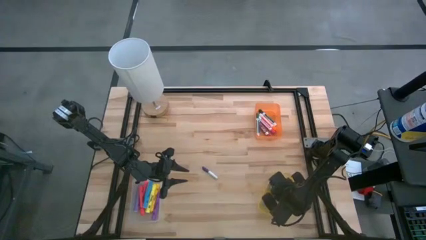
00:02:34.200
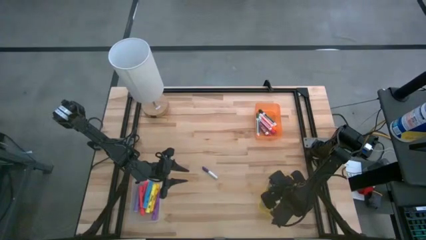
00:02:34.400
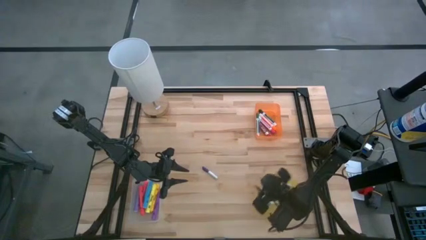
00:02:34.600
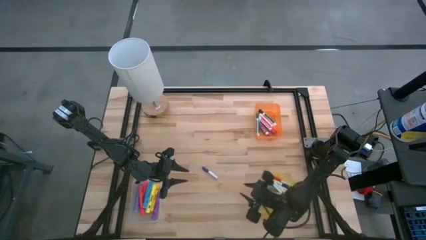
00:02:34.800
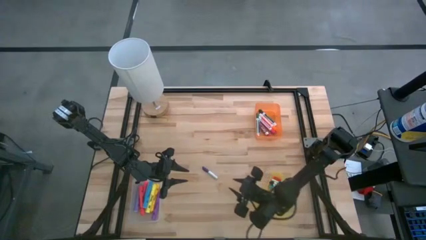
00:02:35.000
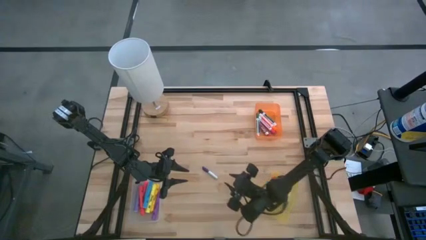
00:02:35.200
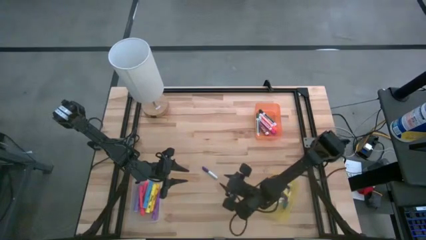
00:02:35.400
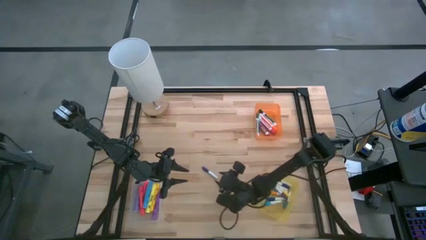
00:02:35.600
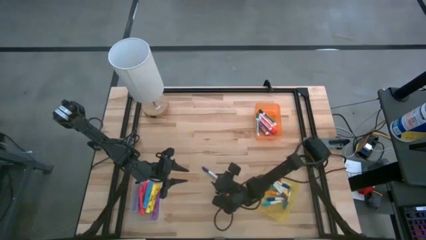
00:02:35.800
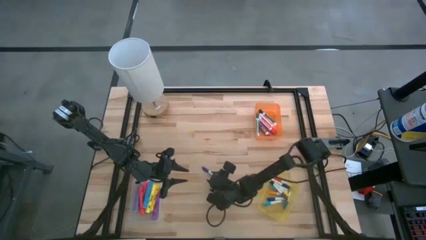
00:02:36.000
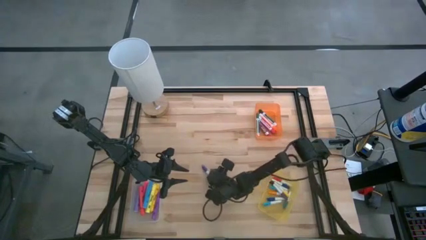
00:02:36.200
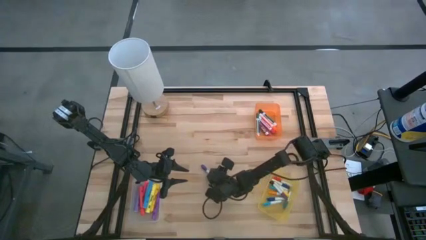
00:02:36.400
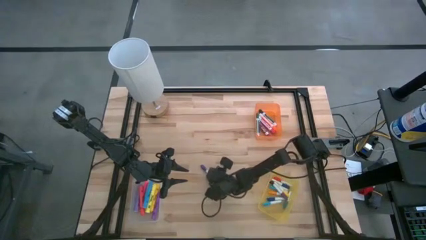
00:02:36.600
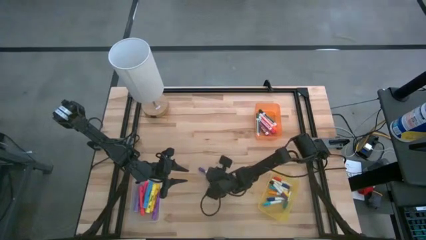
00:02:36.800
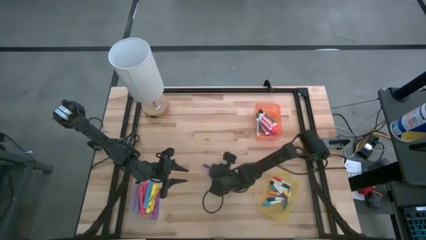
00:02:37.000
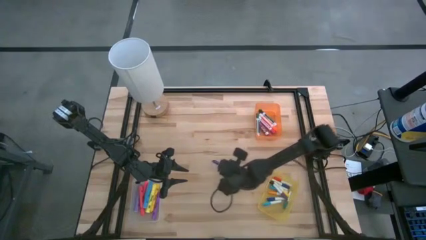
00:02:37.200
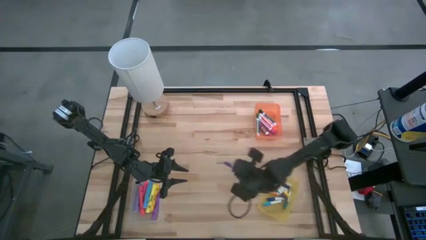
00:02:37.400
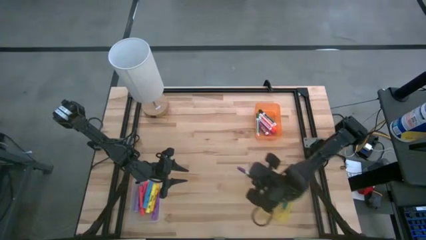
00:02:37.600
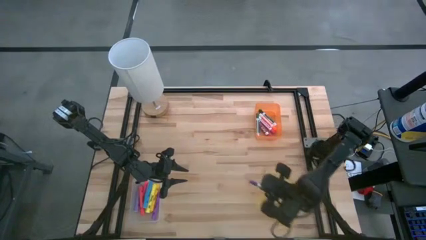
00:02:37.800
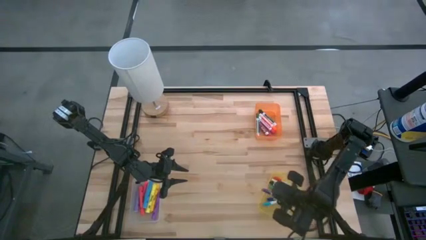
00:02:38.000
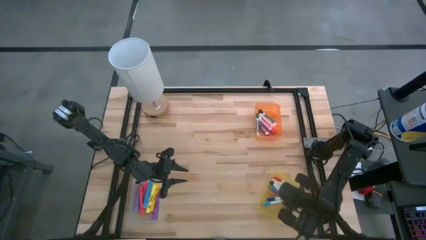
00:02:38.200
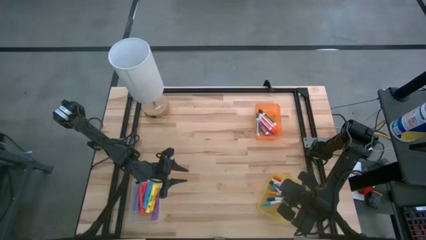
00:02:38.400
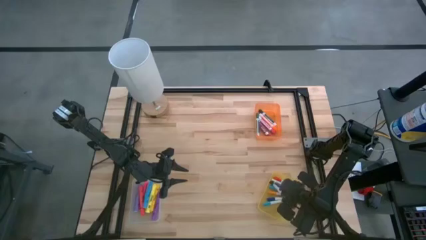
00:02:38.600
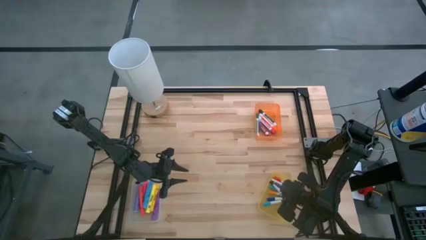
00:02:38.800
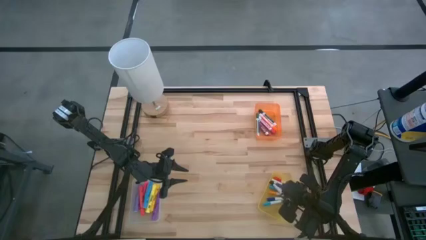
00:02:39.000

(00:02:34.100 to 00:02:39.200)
Task: Pick & Place Markers
Put the violet highlighter pen into the yellow bin

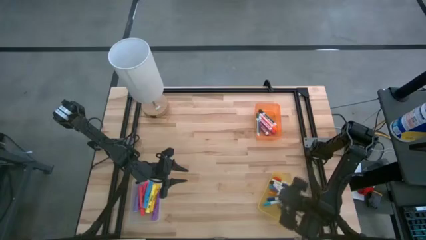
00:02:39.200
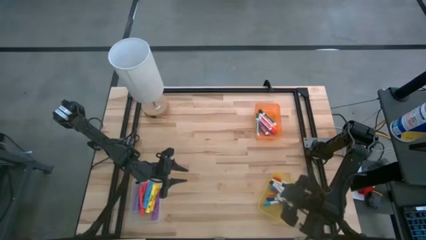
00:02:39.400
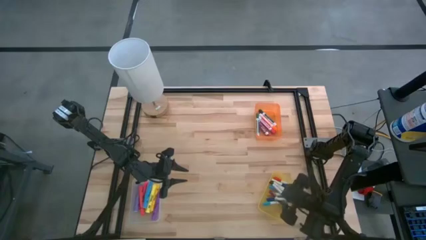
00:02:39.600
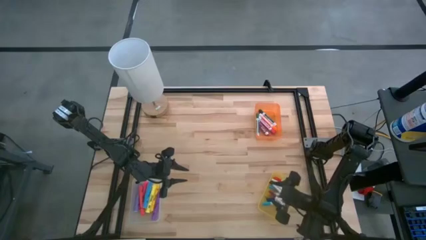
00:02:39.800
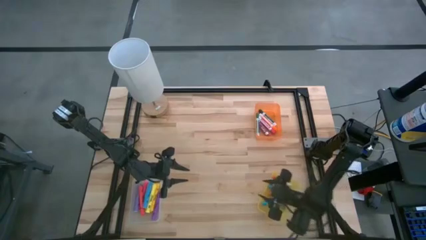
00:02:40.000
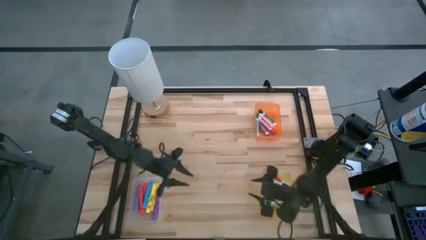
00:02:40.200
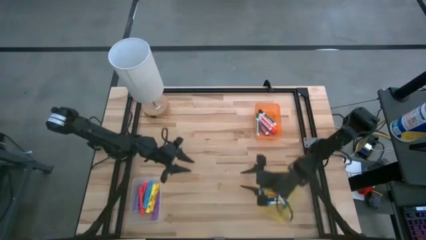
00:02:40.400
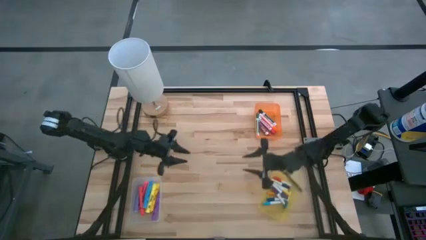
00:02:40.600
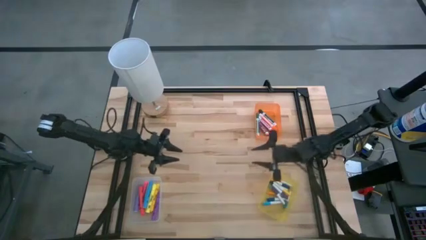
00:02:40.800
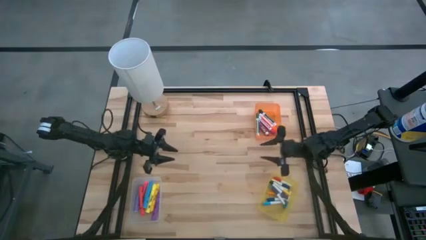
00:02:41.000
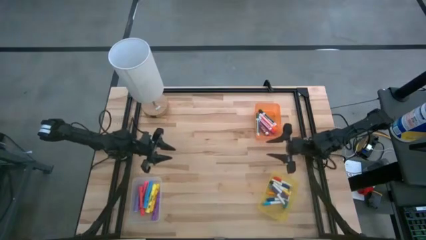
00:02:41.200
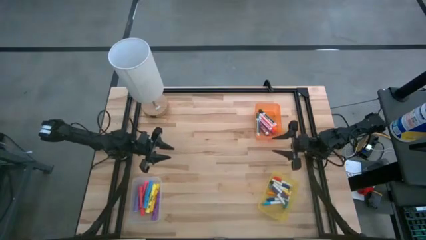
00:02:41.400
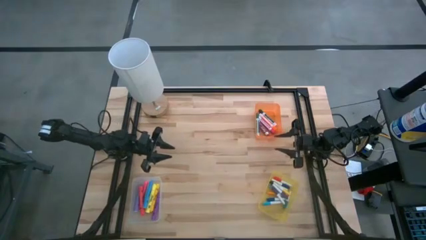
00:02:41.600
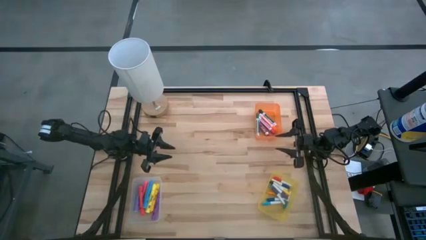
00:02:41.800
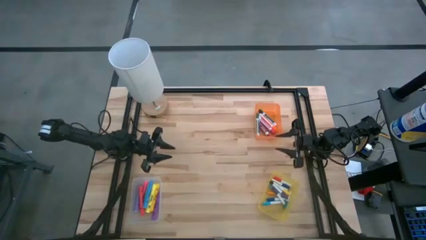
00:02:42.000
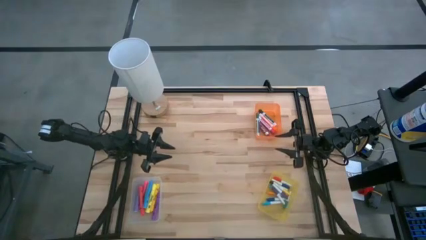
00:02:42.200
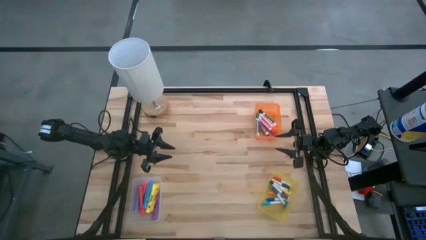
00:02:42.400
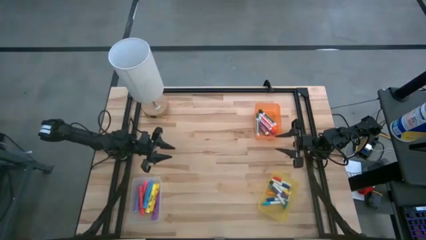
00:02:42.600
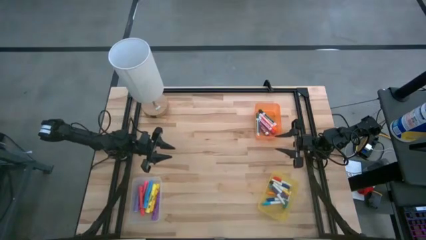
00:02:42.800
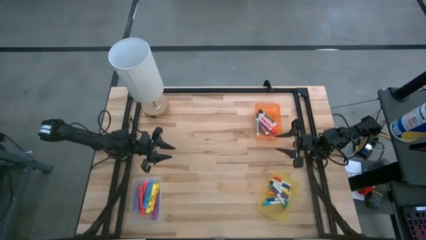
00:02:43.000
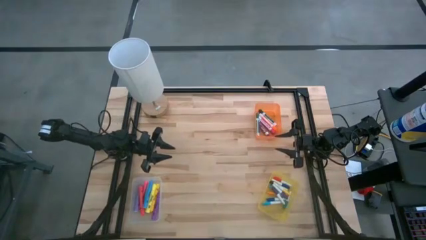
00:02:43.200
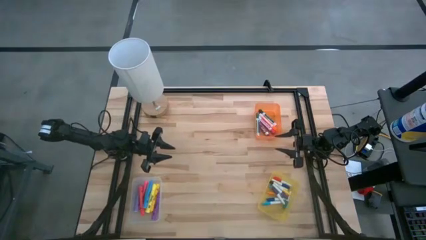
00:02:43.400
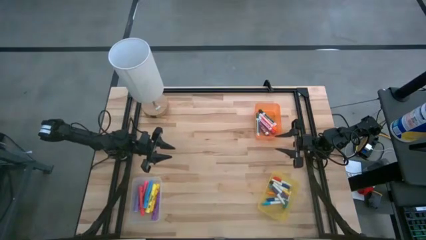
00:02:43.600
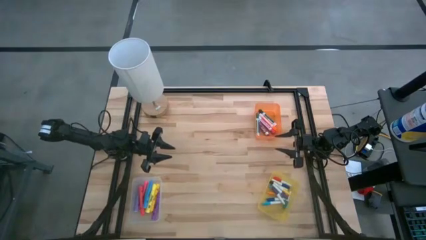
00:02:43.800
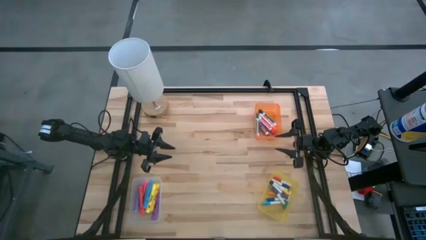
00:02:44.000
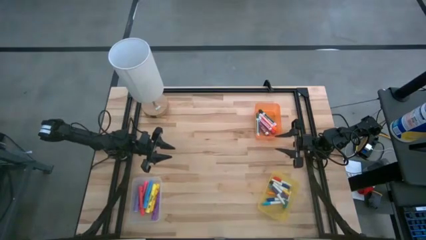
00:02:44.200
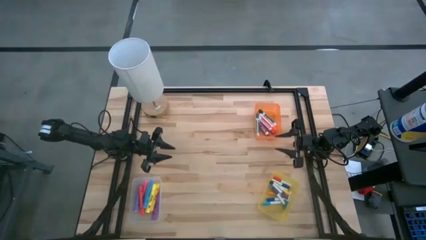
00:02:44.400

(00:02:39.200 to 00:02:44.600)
Return to Home Position

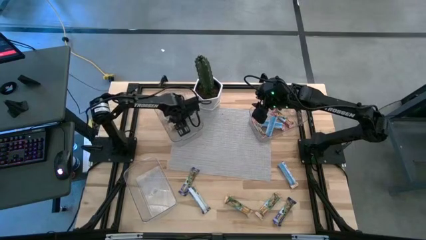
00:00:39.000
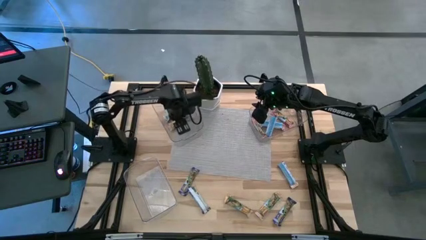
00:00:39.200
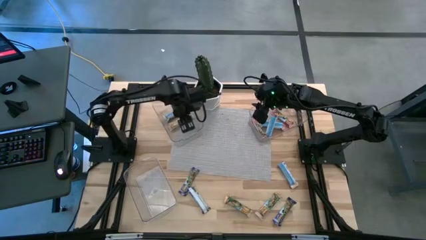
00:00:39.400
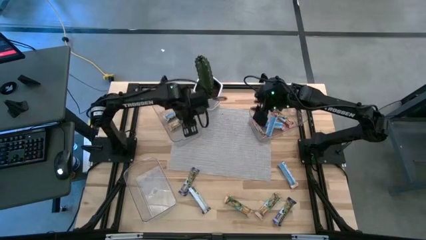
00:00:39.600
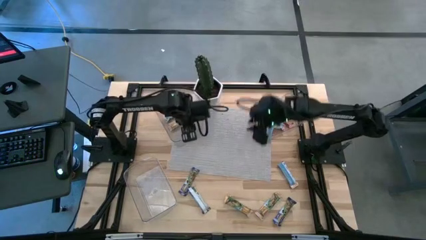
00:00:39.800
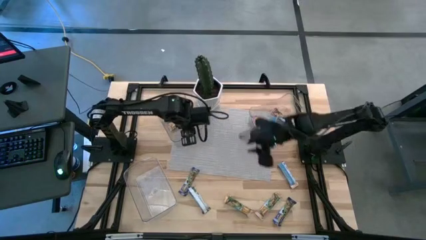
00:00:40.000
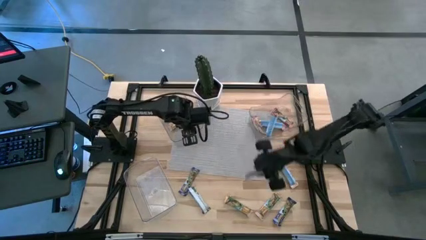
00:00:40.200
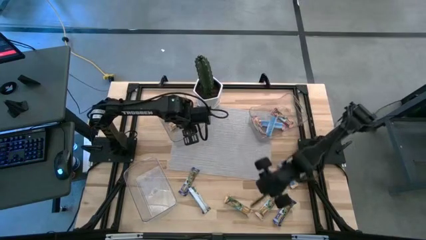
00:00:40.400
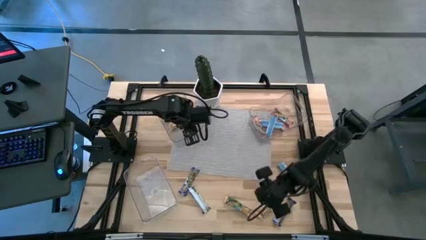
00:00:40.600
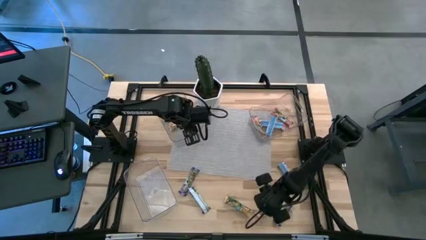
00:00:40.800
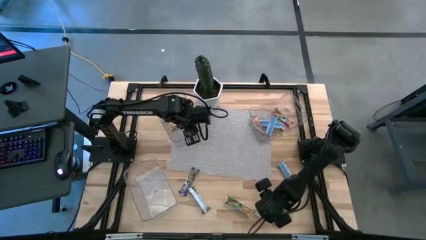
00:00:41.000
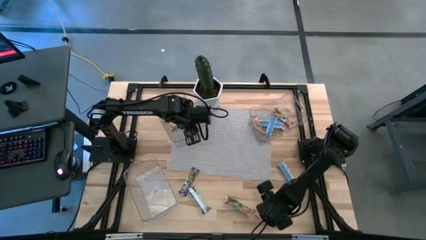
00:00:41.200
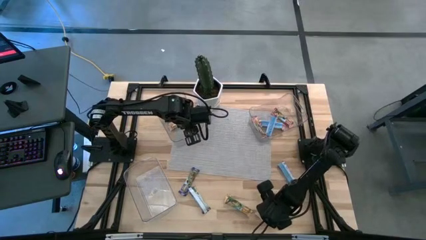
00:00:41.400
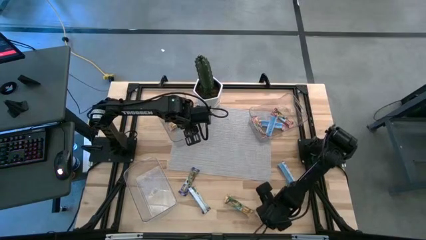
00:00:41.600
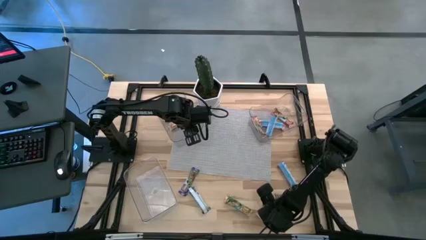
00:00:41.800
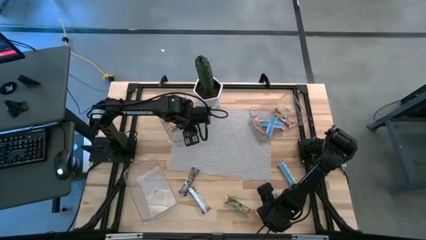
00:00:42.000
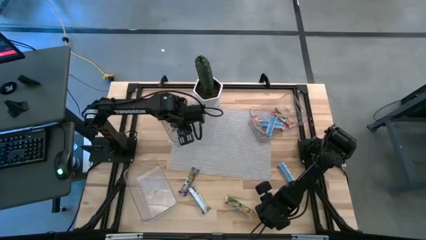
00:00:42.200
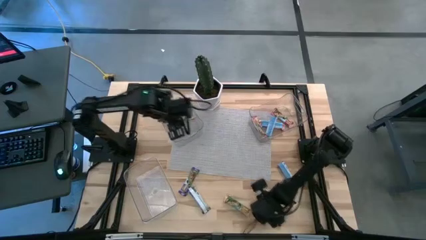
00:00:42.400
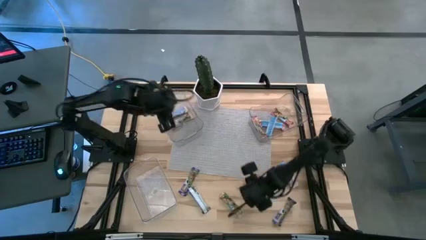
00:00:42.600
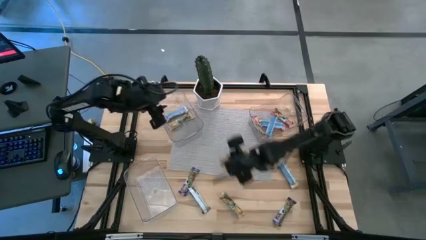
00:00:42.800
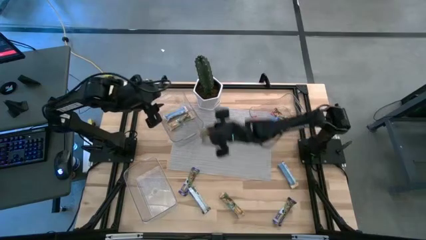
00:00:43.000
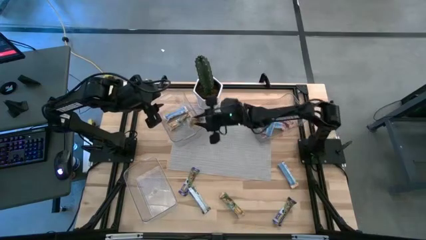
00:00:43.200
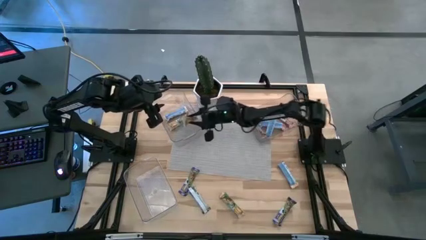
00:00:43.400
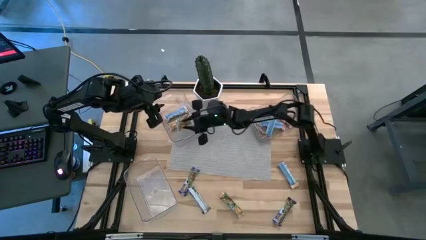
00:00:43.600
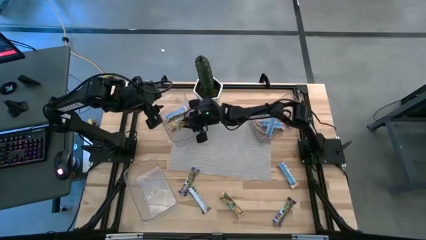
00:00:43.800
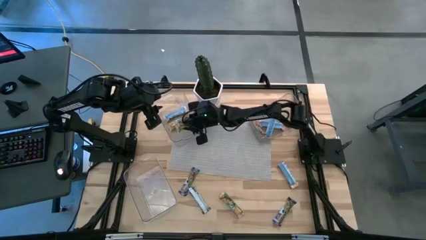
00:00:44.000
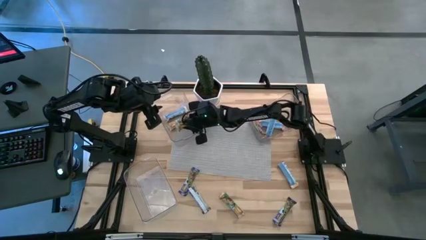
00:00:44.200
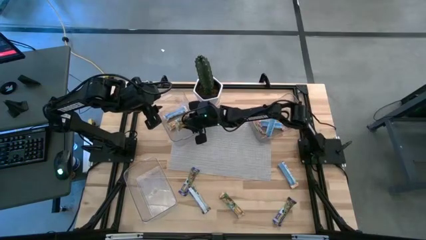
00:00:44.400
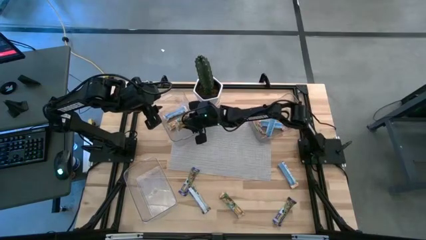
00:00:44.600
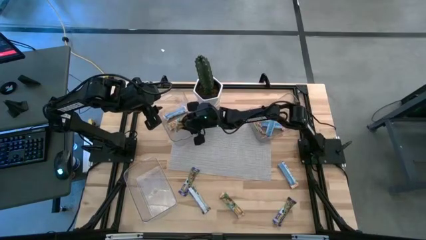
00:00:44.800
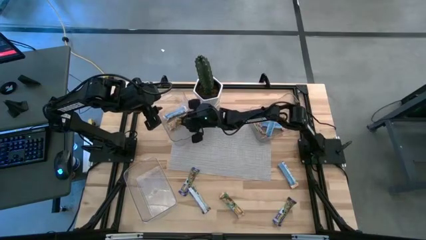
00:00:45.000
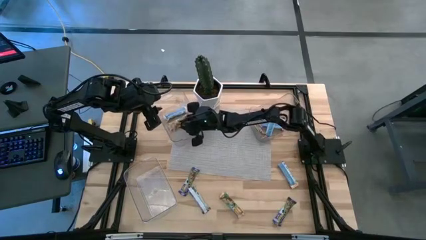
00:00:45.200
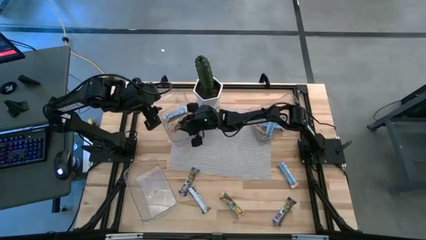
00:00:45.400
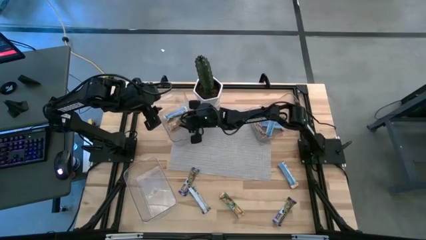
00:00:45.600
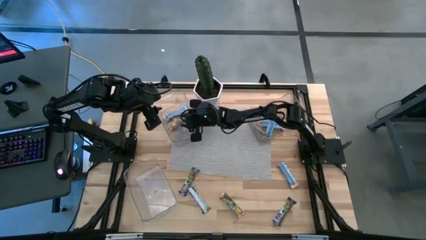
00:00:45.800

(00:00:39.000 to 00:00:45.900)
Task: Pick and place Granola Bars by type
Put the yellow granola bar into the top left transparent bin
